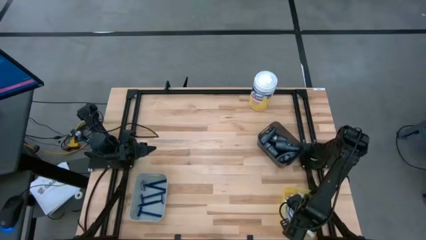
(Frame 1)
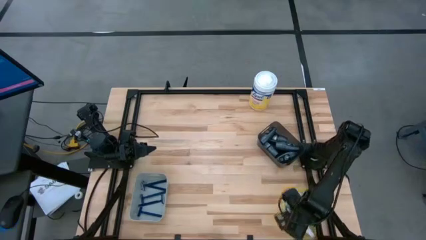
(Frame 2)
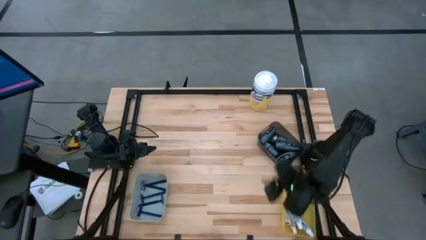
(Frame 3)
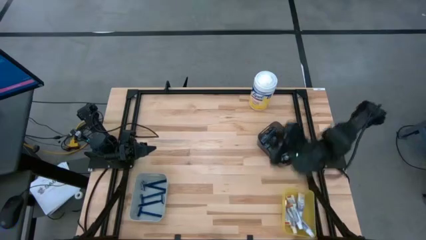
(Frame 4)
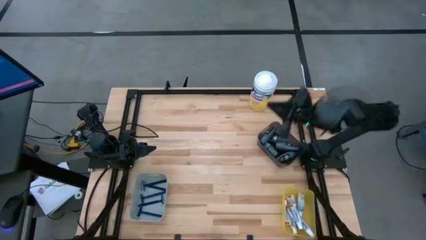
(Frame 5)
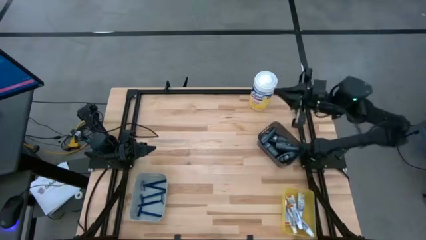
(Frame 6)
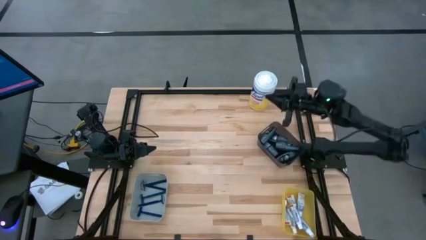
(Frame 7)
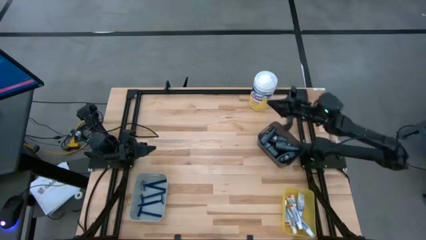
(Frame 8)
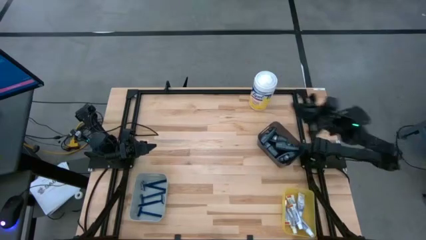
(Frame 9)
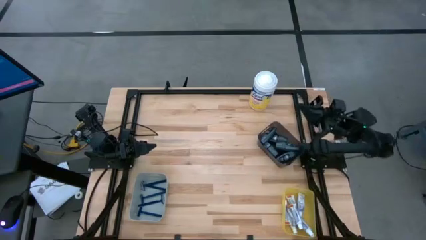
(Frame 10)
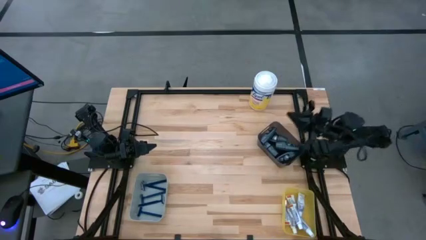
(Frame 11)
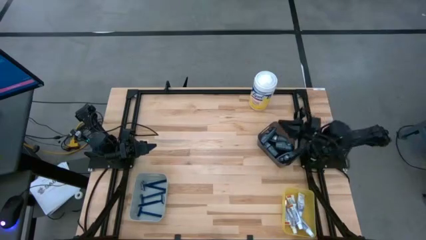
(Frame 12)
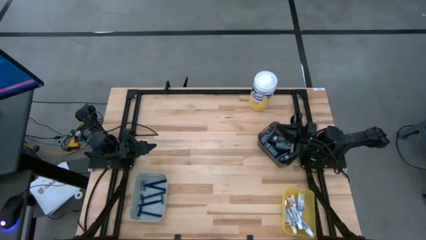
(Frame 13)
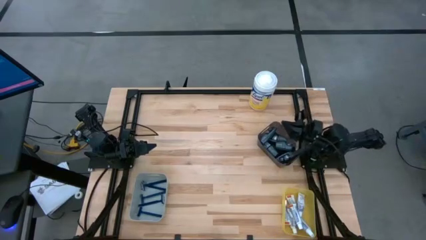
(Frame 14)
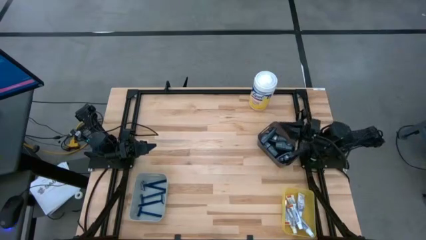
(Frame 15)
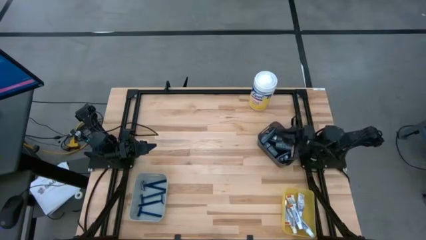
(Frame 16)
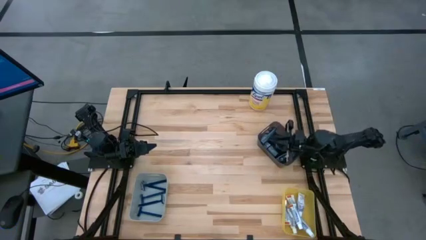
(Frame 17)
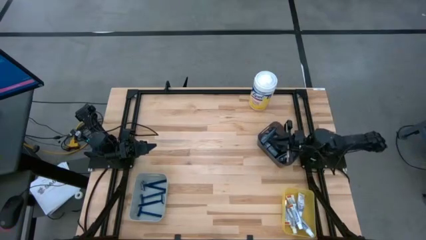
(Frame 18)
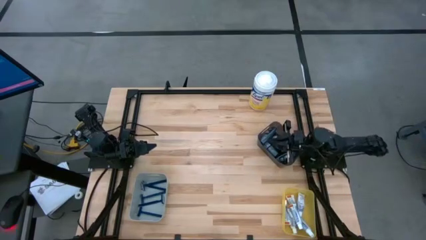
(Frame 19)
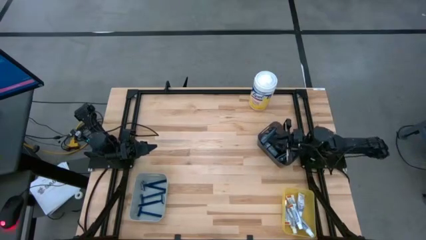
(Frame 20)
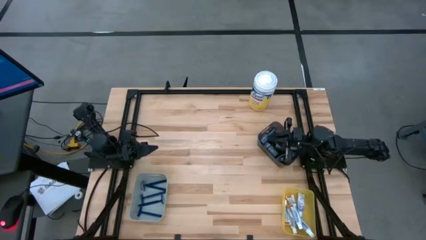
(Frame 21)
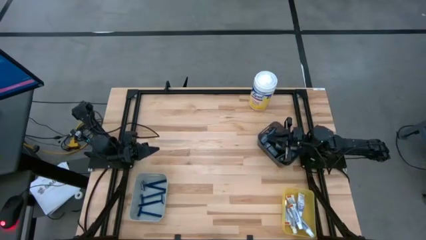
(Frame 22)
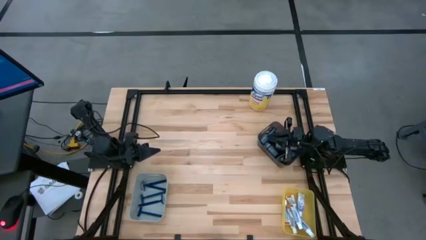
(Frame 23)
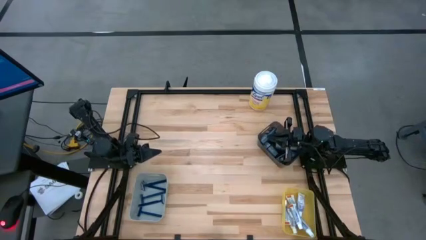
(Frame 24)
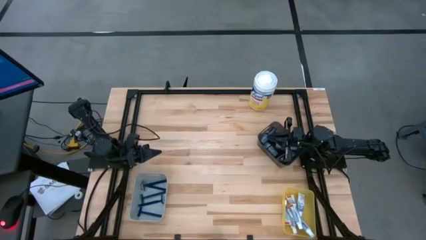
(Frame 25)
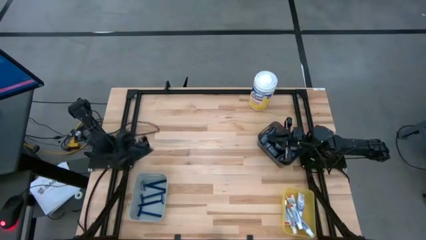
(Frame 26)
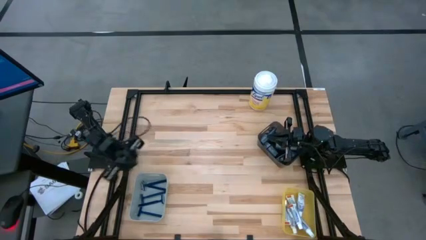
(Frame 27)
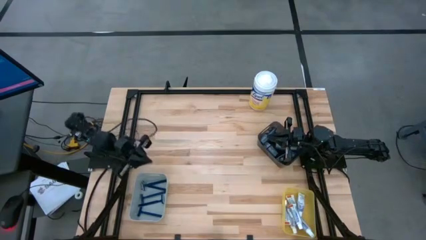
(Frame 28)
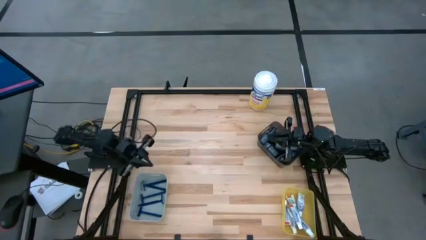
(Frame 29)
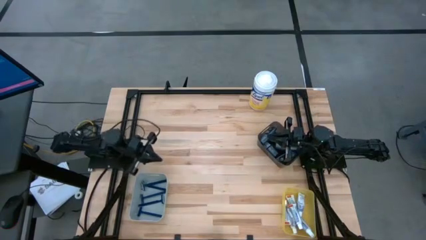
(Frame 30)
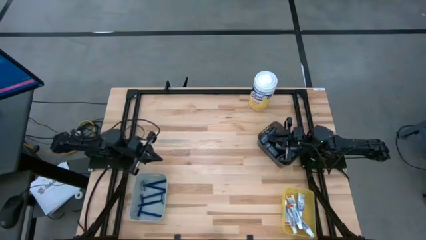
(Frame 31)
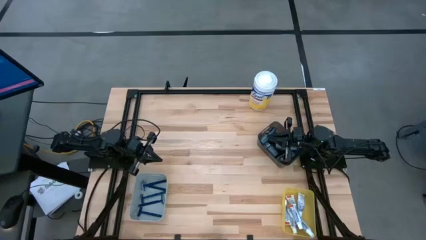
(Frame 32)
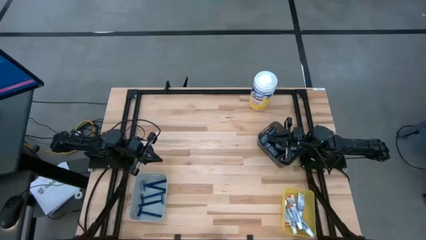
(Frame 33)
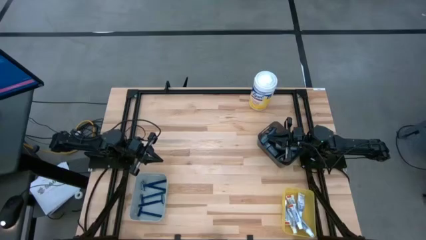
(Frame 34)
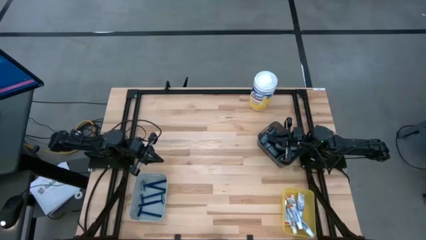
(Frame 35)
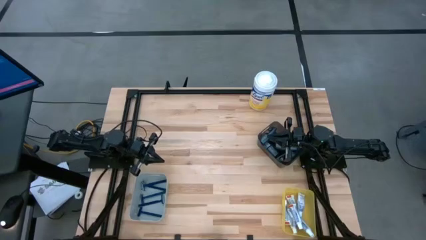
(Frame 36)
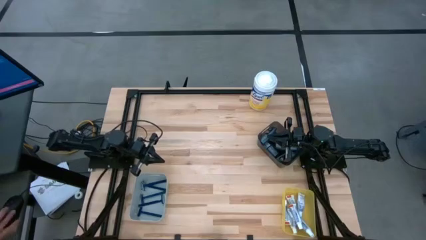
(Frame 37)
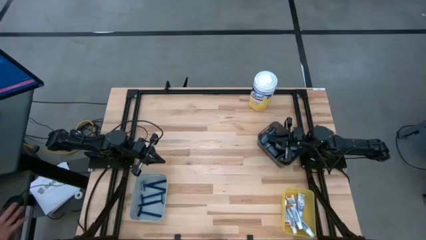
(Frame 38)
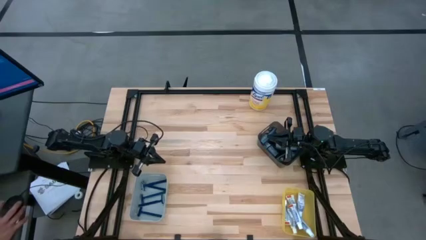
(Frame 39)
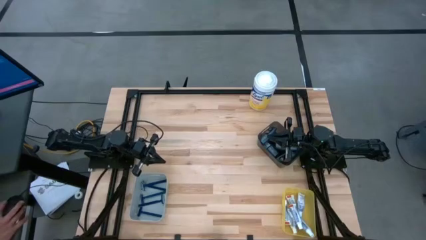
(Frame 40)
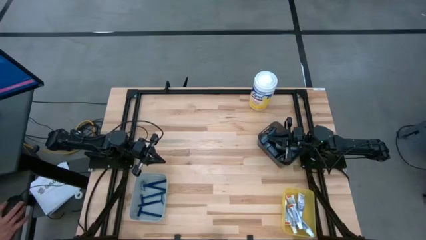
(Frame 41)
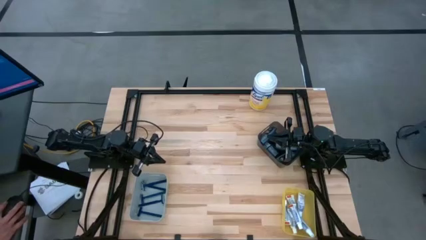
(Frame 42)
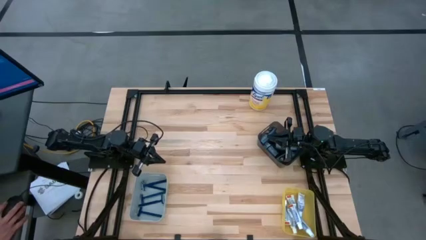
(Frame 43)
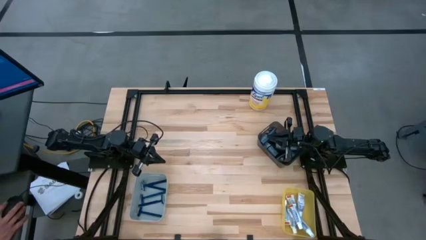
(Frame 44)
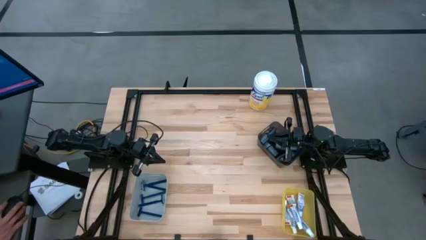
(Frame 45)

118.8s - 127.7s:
Task: Pick & Place Travel size toiletries
Return to Home Position

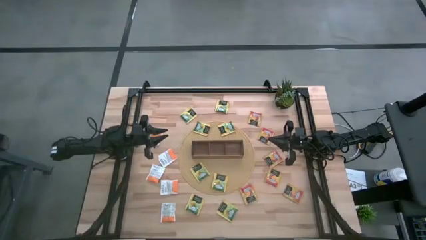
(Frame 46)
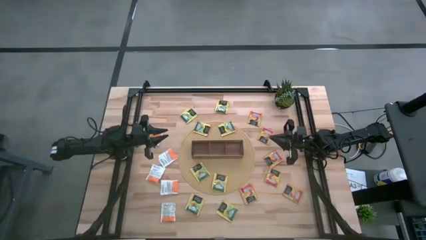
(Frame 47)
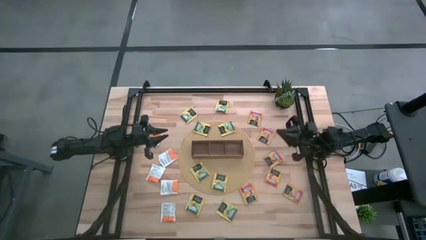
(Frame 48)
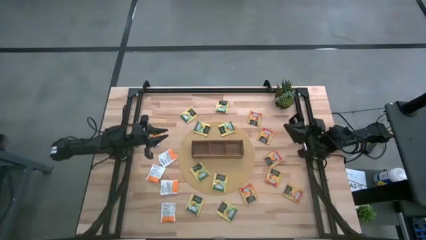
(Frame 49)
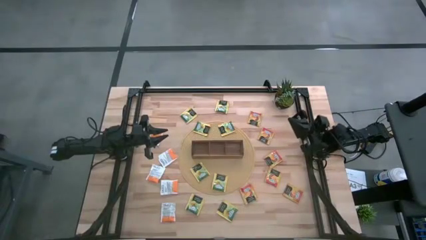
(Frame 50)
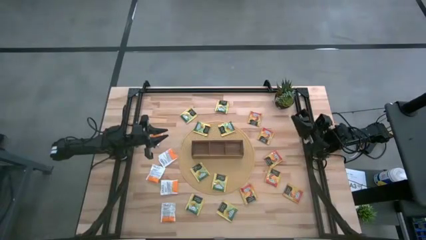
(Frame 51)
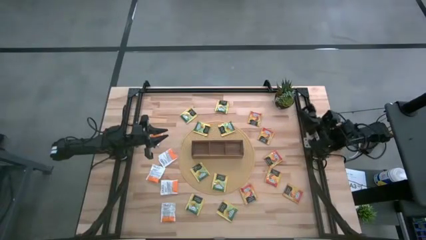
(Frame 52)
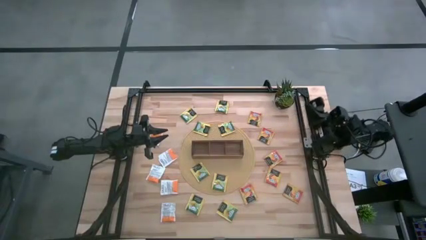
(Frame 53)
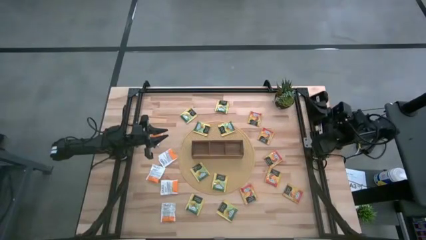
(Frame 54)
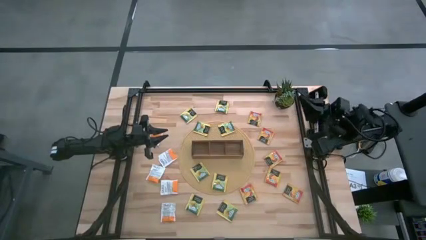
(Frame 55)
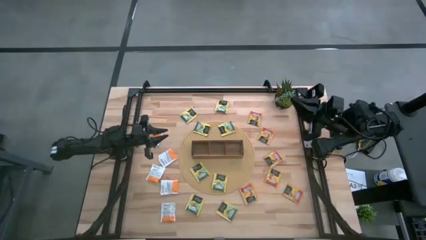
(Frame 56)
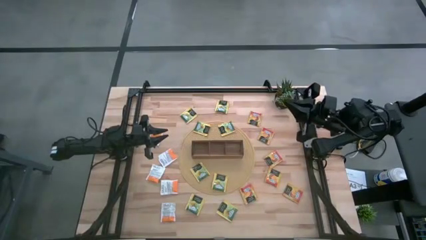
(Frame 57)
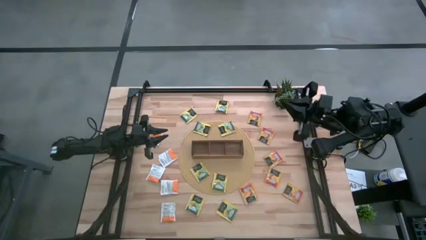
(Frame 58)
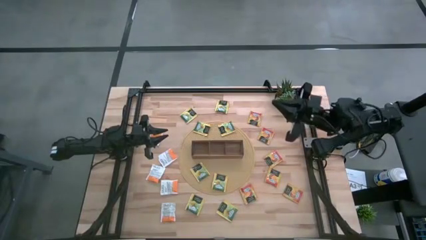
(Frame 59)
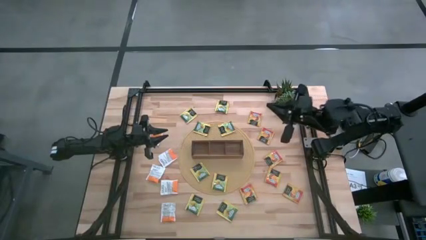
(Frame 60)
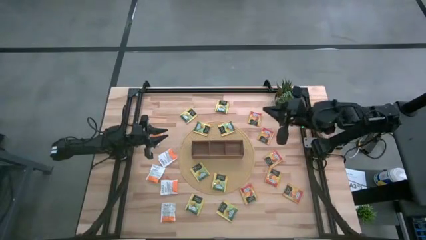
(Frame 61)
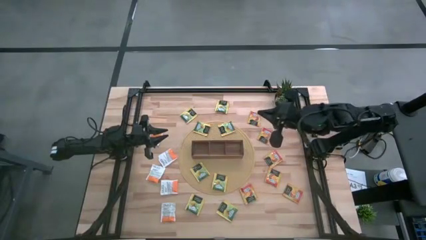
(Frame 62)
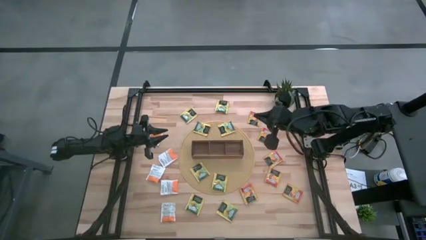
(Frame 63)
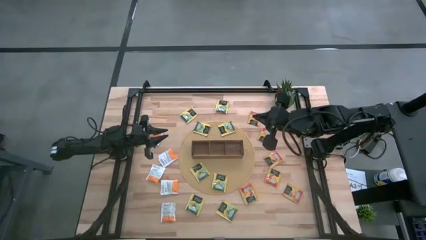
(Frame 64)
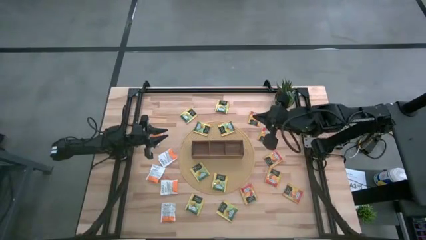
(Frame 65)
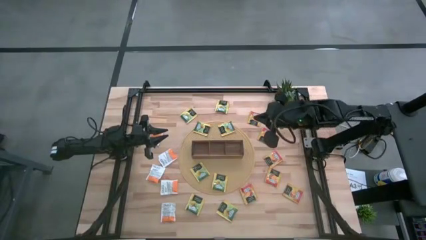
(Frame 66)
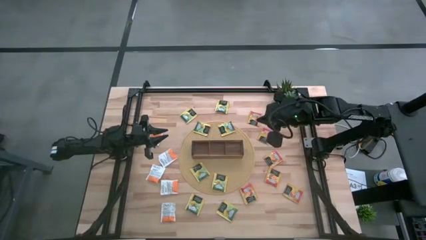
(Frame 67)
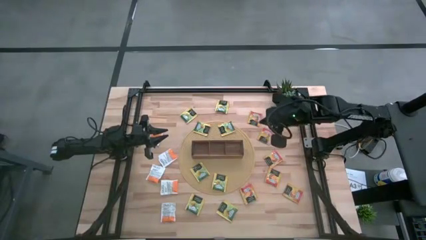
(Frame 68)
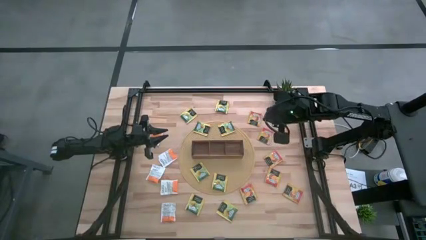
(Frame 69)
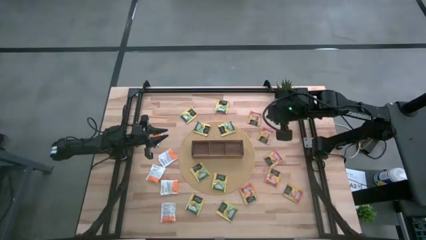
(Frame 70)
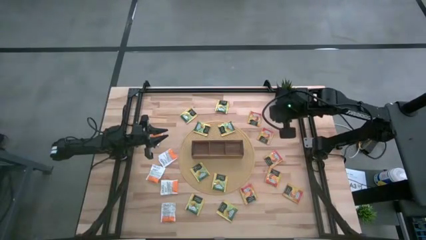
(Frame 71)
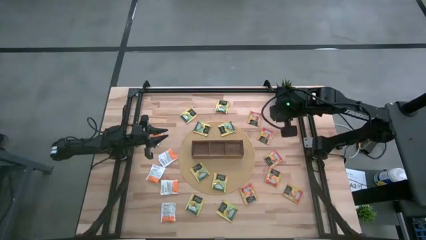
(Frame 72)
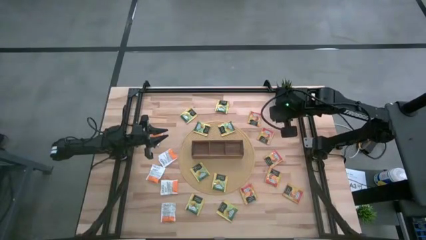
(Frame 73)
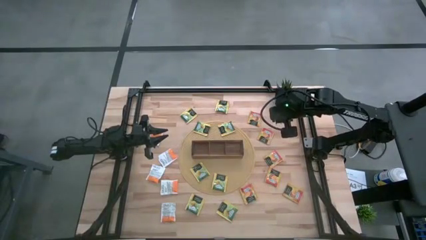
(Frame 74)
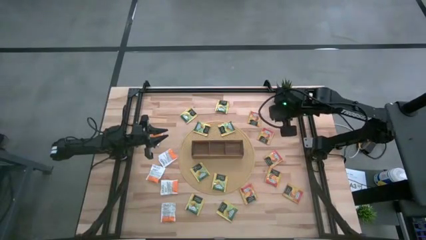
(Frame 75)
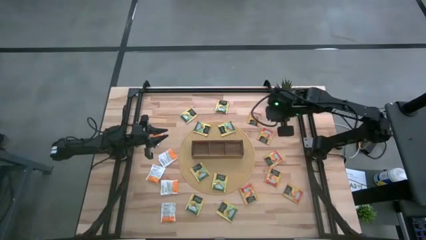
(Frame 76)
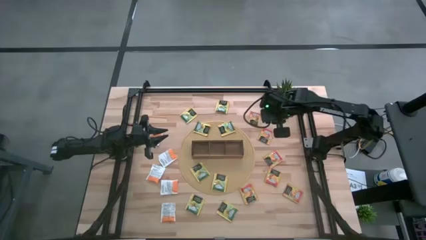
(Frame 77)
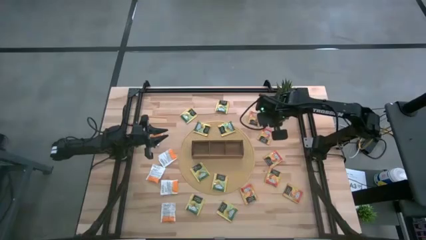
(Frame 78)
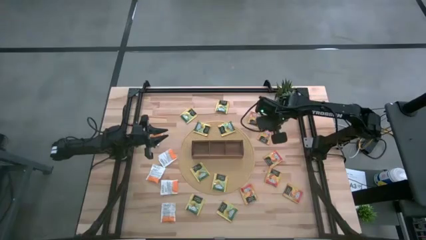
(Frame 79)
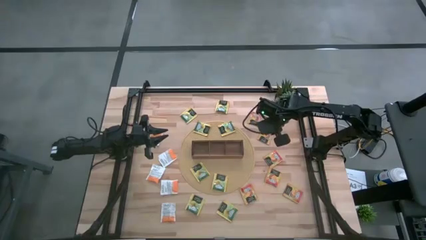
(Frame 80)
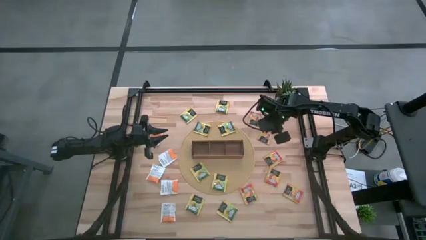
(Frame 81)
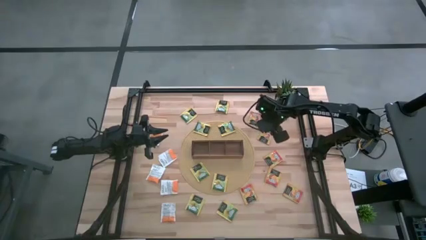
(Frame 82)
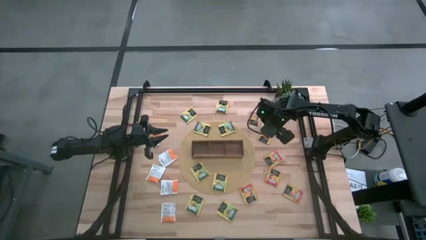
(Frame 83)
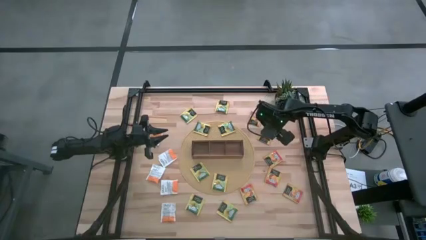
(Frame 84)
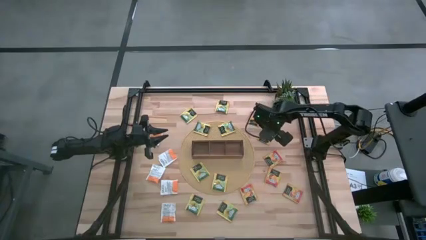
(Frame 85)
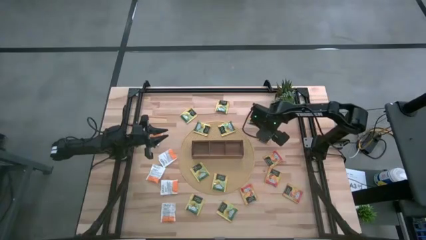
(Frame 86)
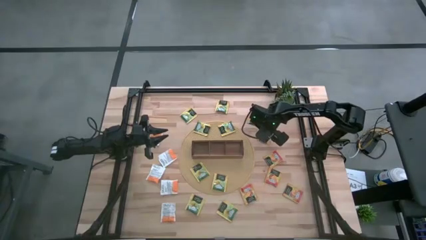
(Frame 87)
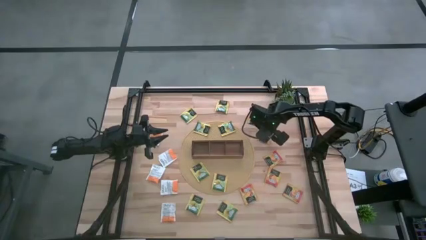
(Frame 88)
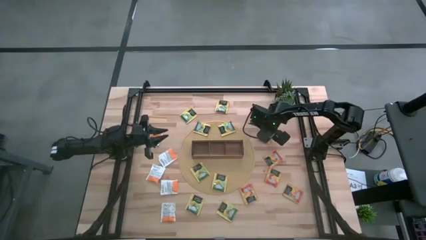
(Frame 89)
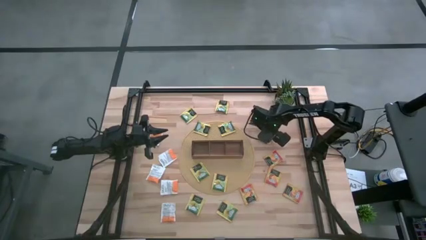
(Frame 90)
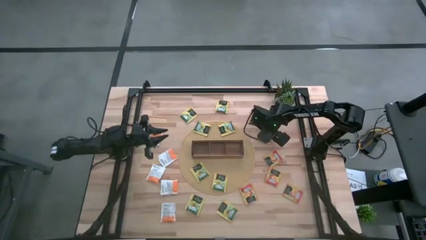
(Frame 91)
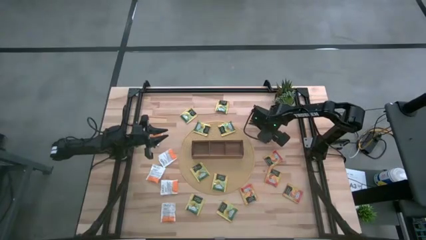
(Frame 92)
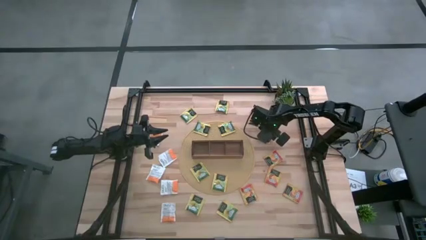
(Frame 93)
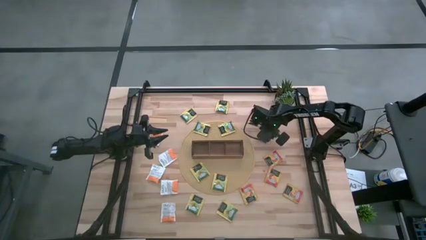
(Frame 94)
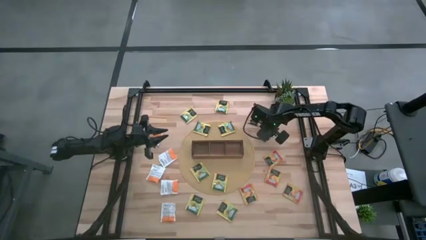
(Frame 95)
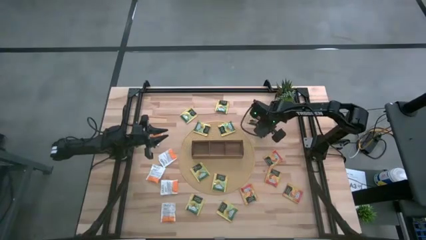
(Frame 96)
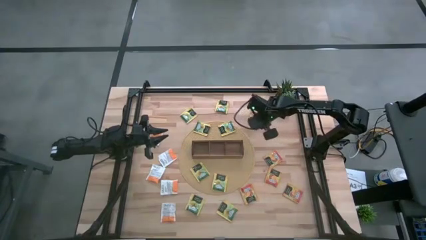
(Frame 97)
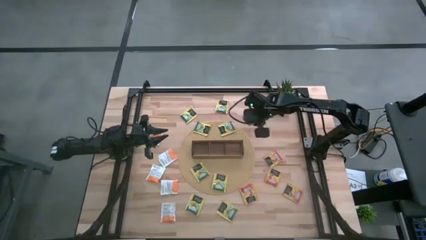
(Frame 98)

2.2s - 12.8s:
Task: Pick & Place Tea
Put the orange tea bag into the right section of the wooden organizer
